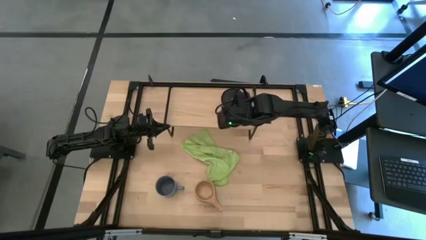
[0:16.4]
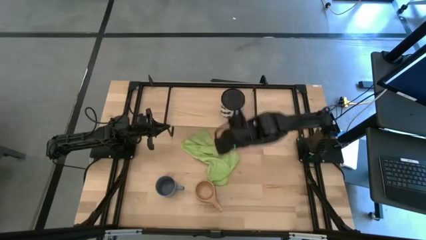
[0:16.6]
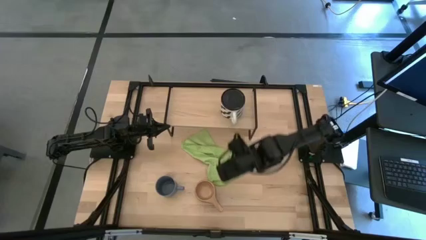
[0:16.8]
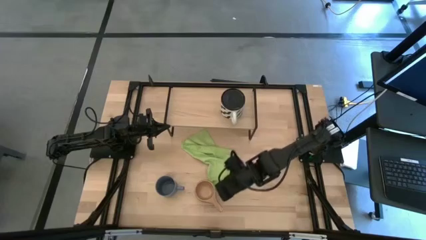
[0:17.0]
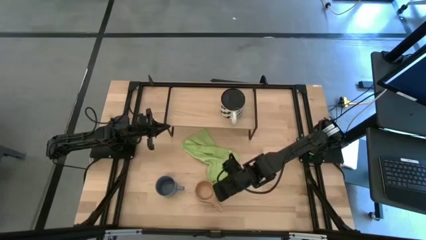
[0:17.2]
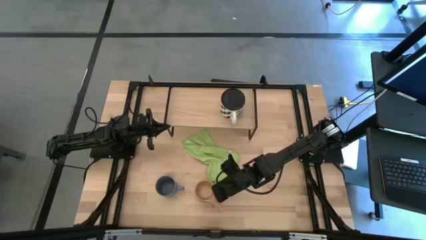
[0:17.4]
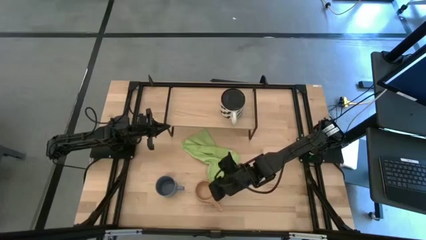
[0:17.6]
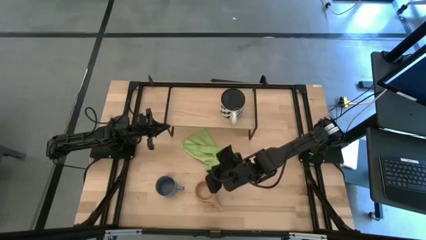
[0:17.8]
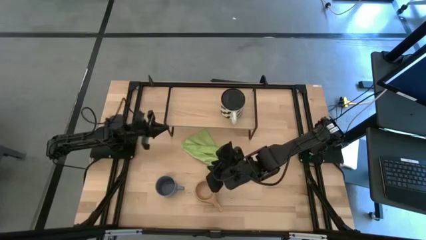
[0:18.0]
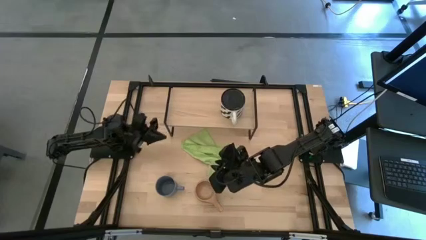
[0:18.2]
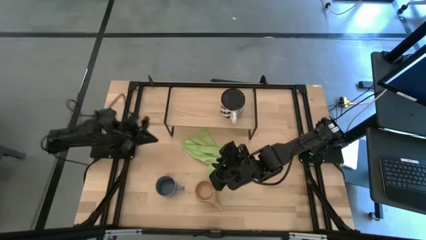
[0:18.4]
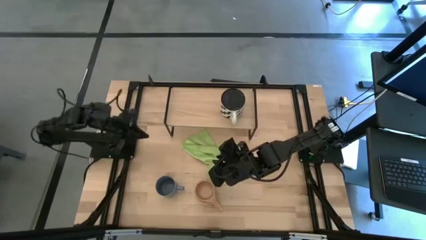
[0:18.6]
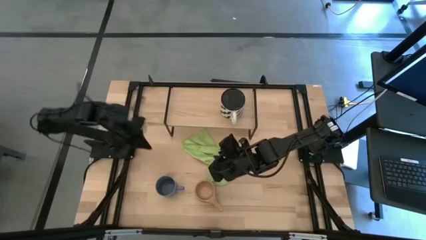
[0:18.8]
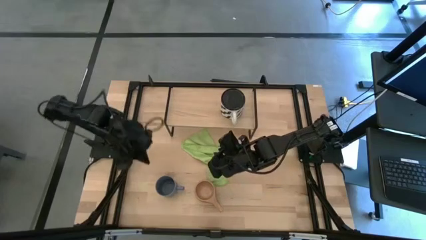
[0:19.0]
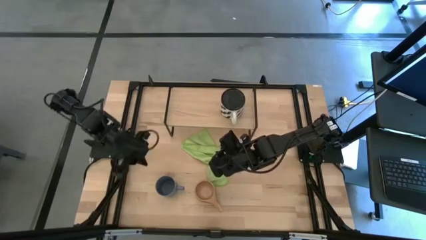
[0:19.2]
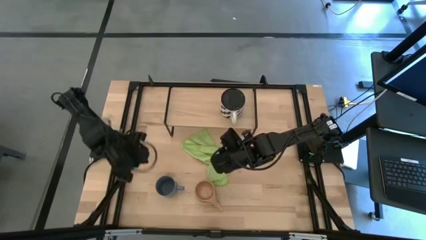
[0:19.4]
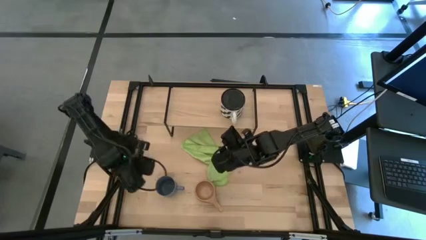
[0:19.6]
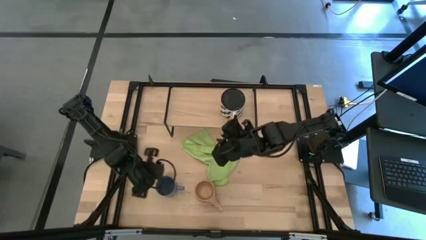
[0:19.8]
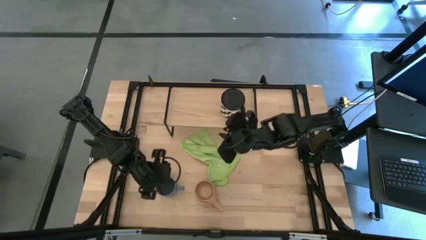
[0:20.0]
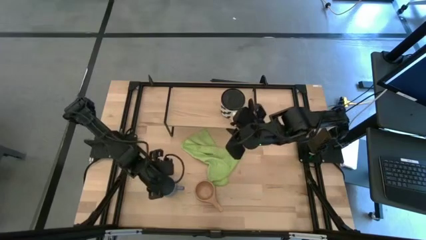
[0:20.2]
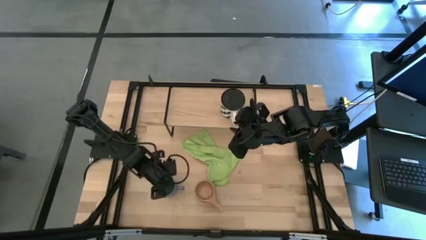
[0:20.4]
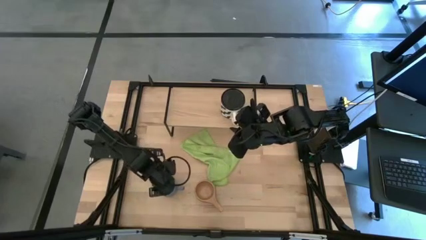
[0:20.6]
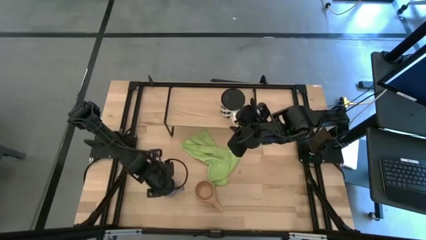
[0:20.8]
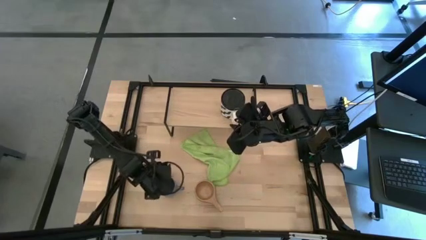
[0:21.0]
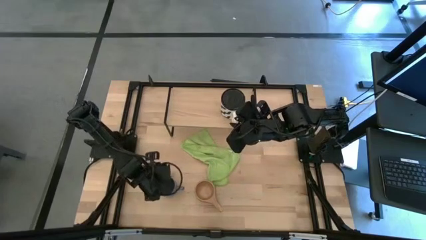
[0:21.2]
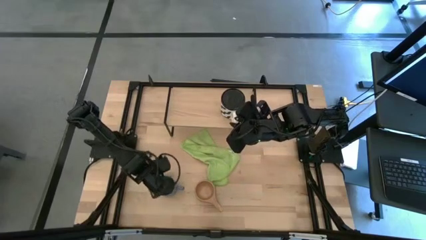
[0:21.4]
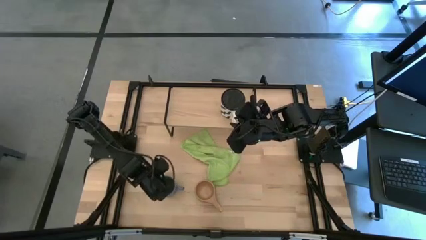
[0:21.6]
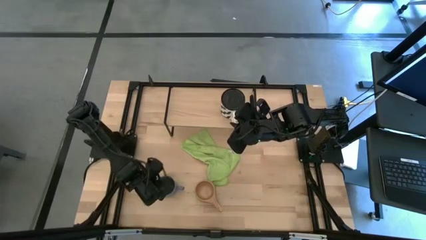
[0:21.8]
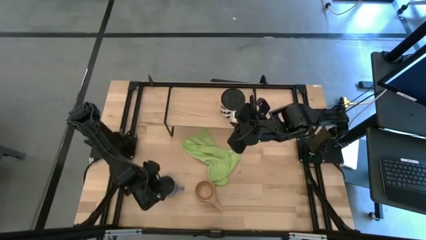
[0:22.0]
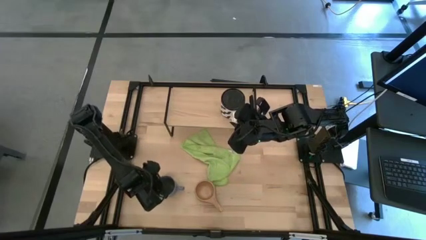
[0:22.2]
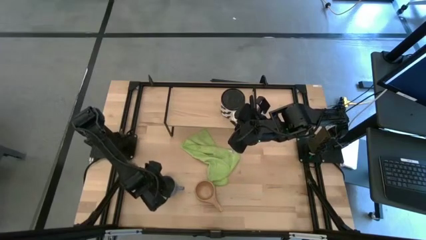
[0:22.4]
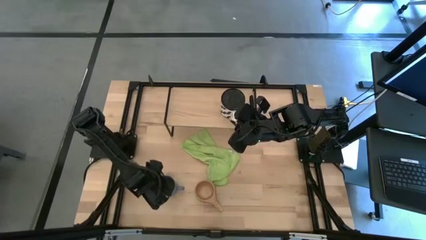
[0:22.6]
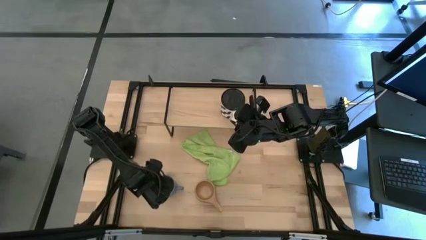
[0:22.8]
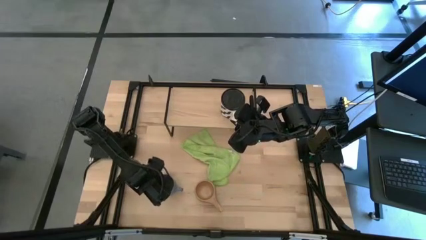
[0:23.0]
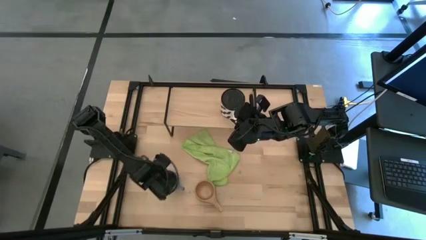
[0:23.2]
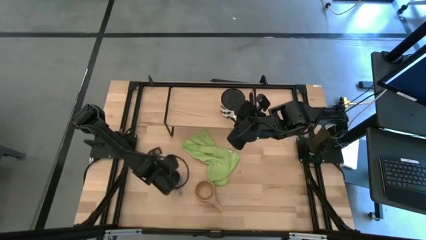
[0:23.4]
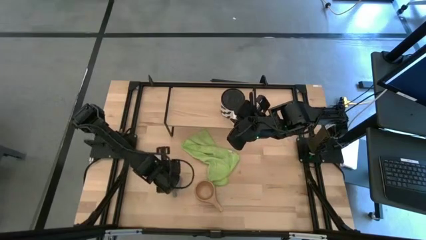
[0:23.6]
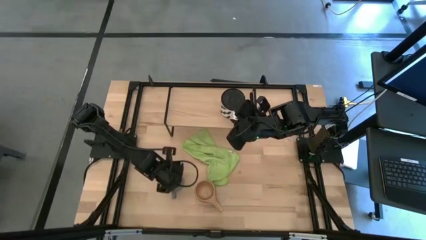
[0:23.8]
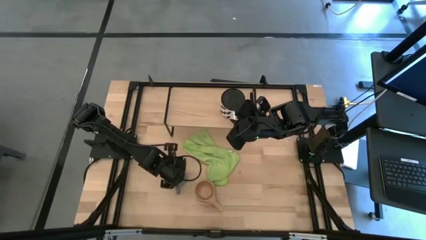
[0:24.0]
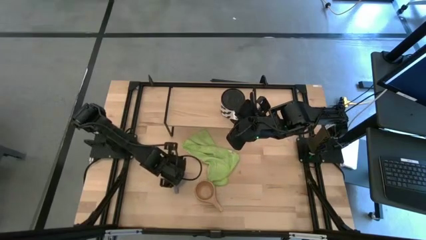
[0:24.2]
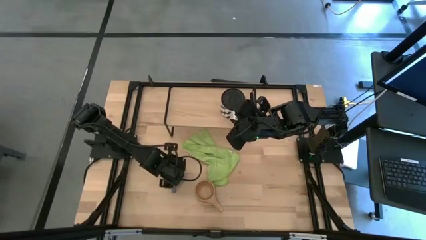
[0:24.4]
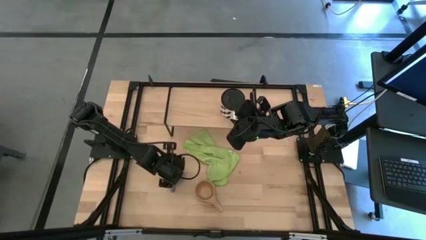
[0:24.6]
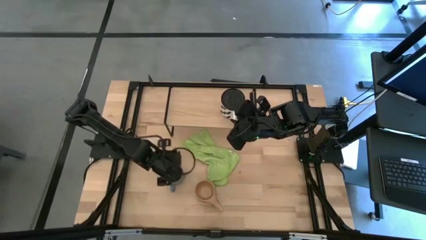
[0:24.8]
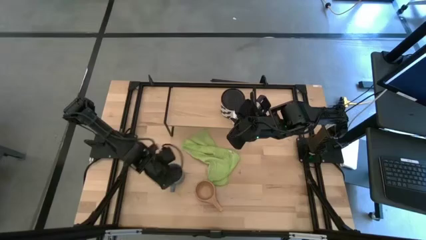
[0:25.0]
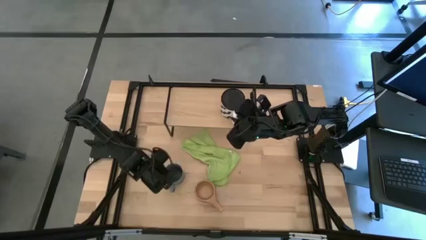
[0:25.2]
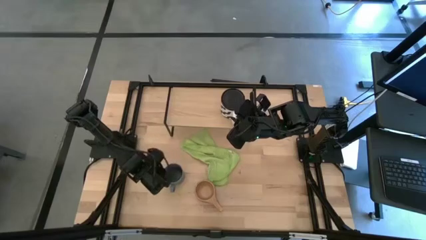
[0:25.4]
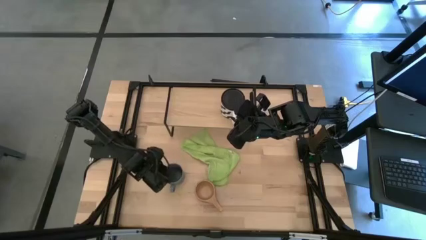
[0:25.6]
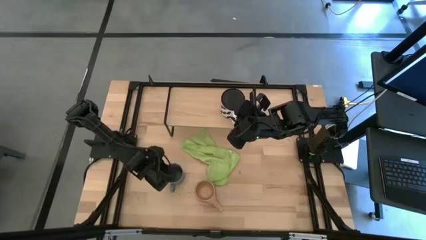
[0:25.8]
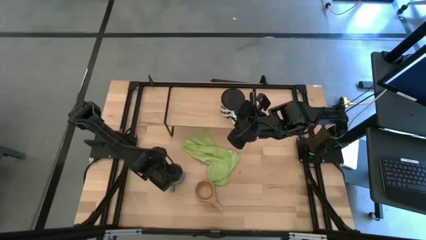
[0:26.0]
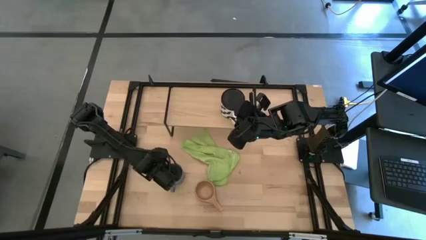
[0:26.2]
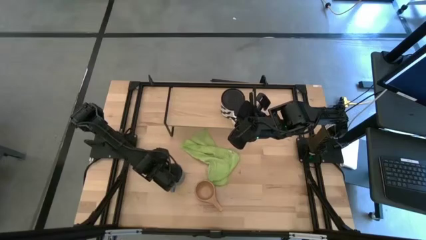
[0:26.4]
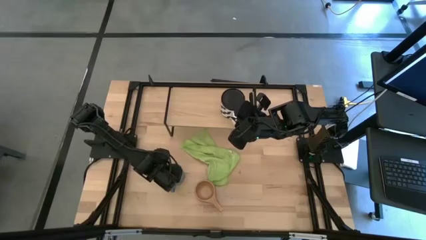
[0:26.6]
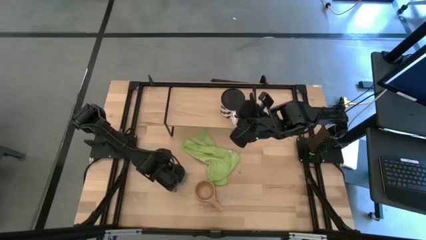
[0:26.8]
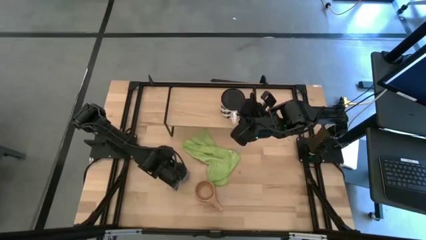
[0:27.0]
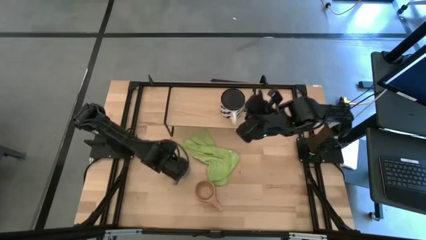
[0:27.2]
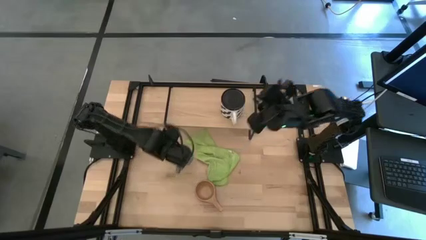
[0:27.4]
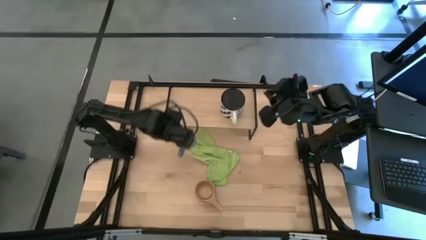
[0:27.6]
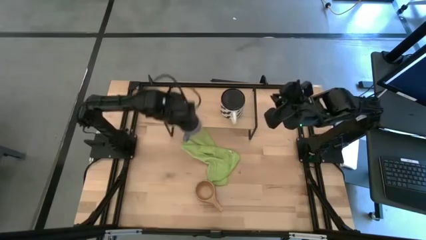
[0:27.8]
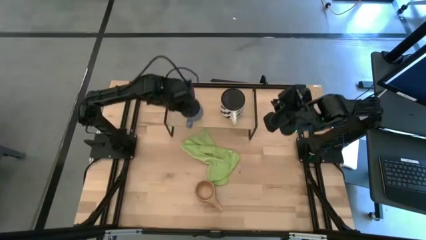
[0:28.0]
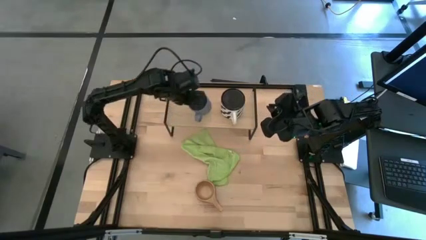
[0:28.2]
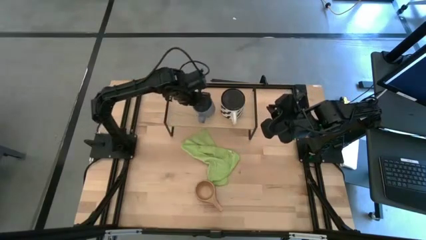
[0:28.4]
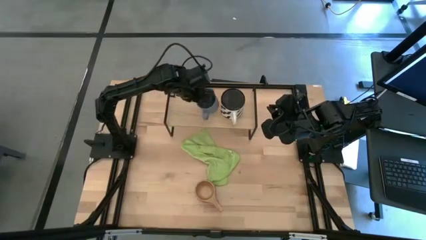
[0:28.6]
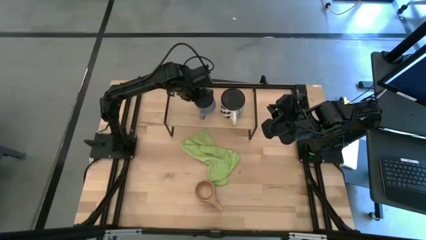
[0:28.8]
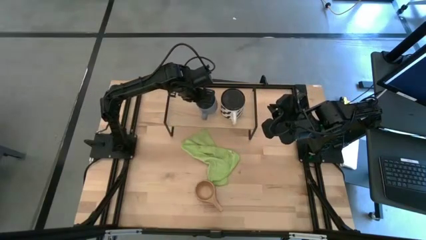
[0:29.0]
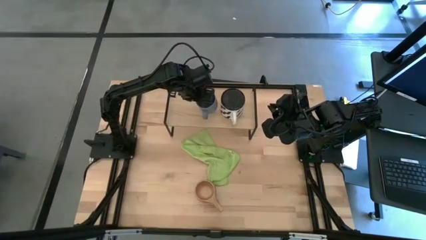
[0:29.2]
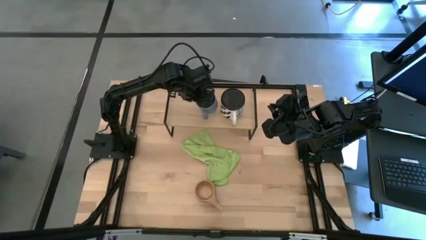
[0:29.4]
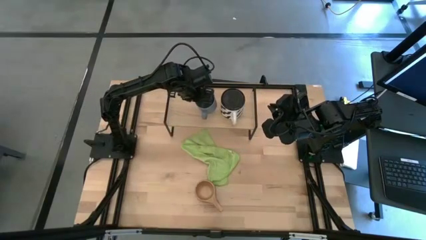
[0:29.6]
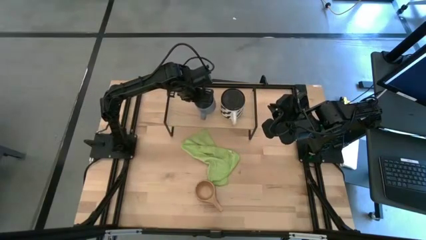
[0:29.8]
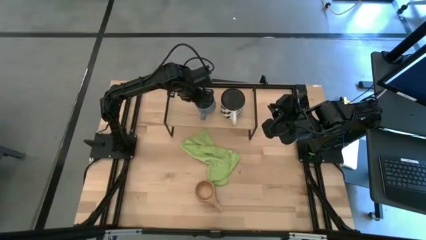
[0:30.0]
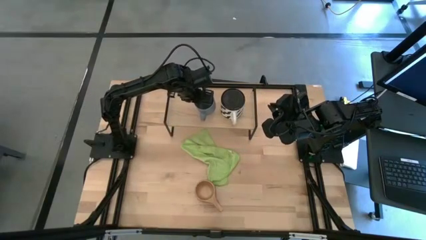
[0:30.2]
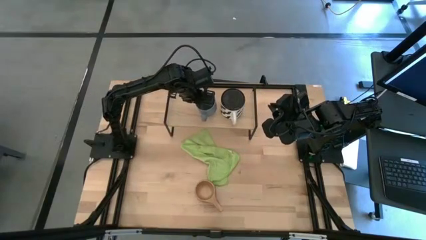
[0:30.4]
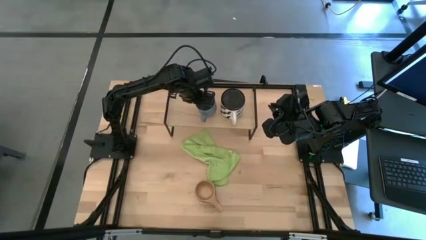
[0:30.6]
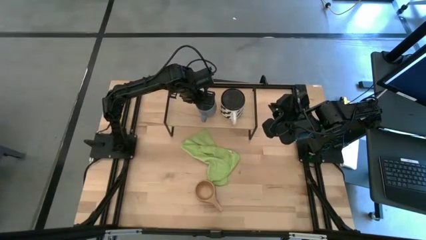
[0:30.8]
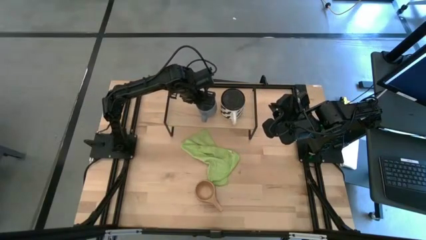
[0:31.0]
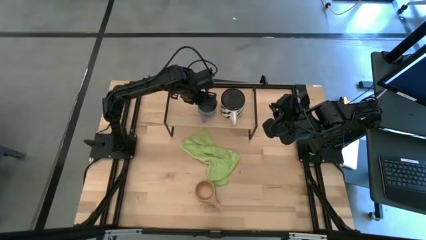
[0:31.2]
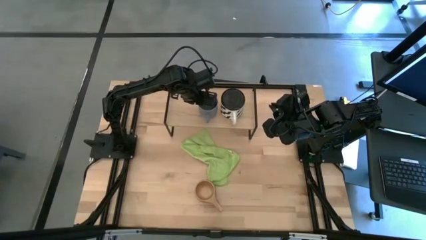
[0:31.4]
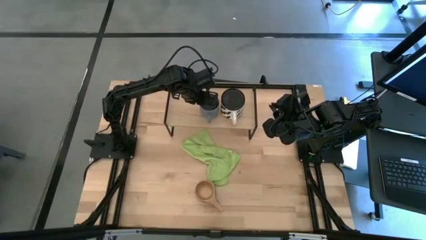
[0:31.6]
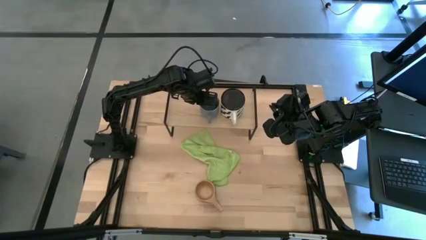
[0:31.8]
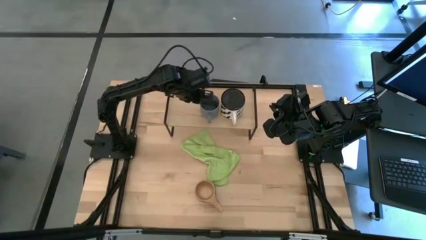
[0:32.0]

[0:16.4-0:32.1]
Task: Stack small to large cups/mugs on shelf
Put the blue mug on the shelf
